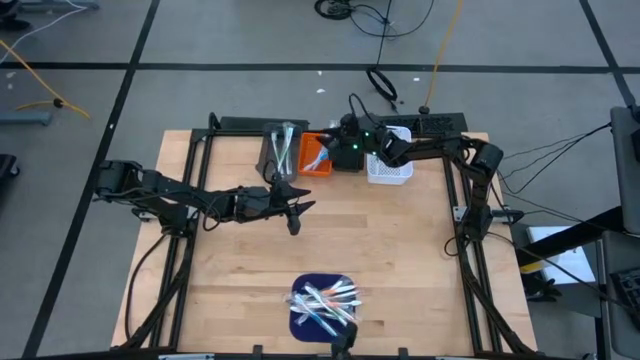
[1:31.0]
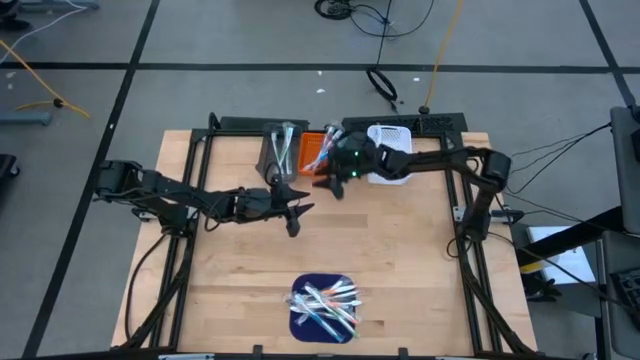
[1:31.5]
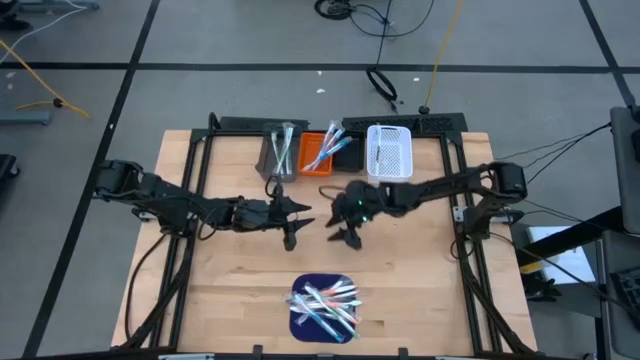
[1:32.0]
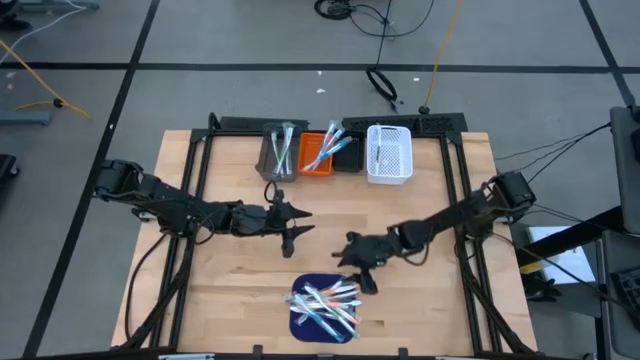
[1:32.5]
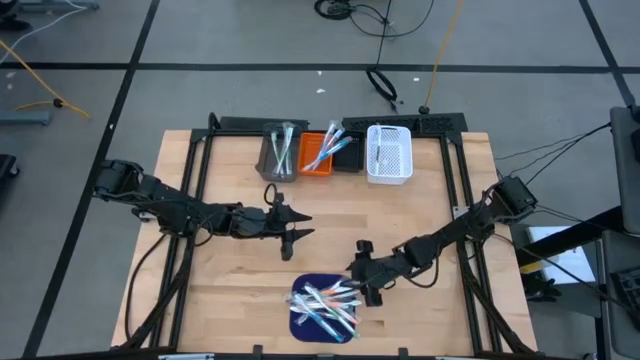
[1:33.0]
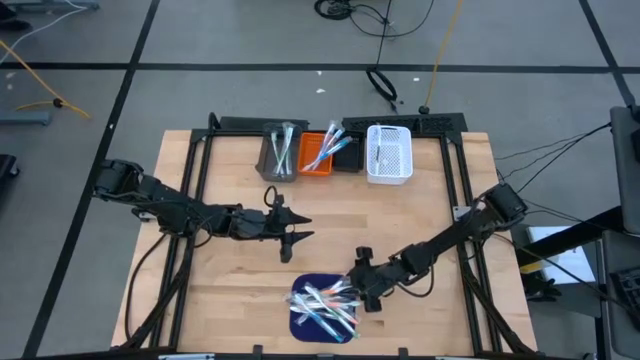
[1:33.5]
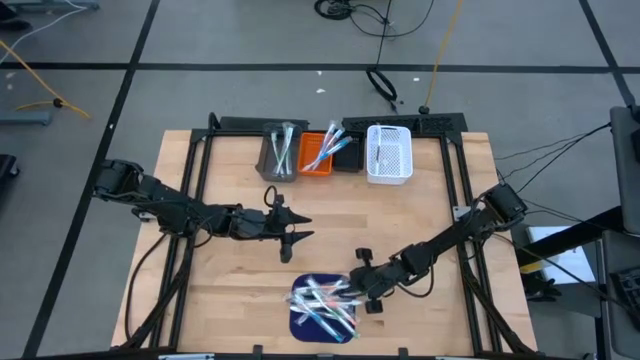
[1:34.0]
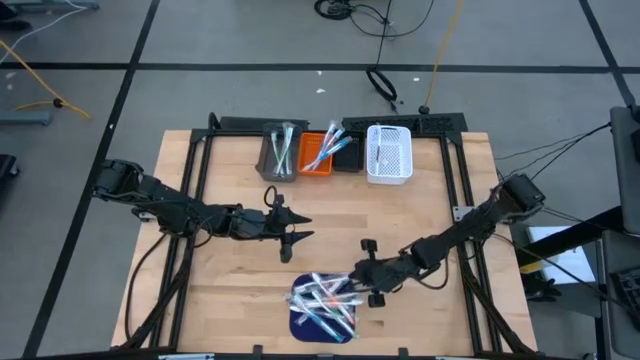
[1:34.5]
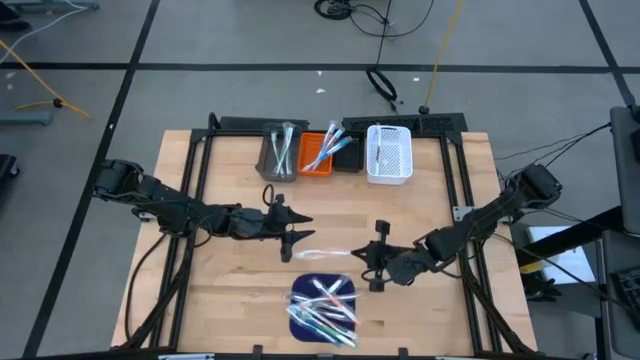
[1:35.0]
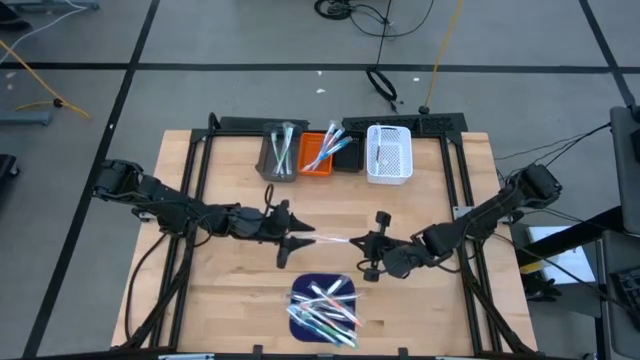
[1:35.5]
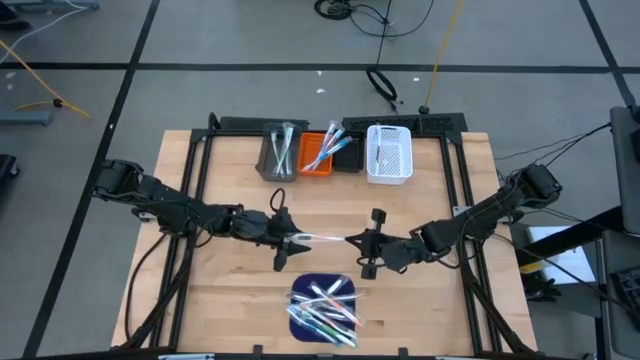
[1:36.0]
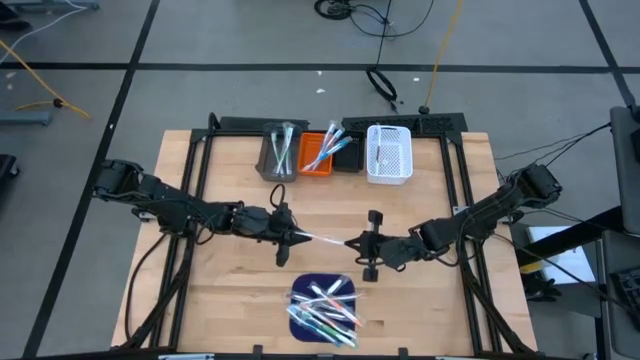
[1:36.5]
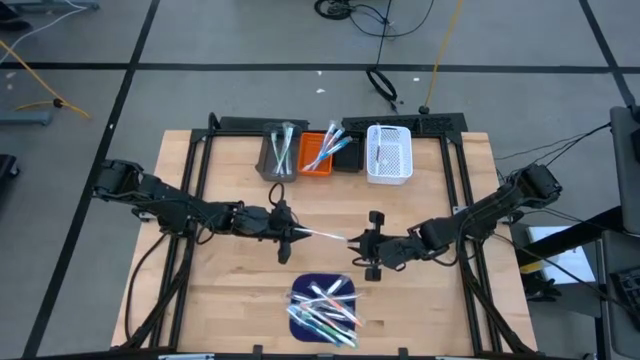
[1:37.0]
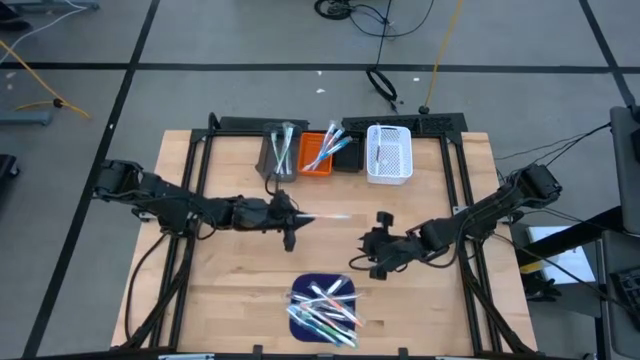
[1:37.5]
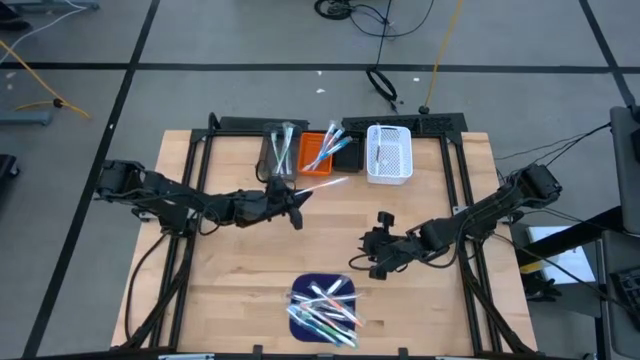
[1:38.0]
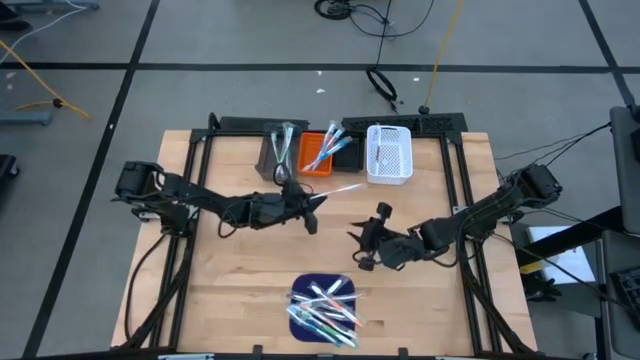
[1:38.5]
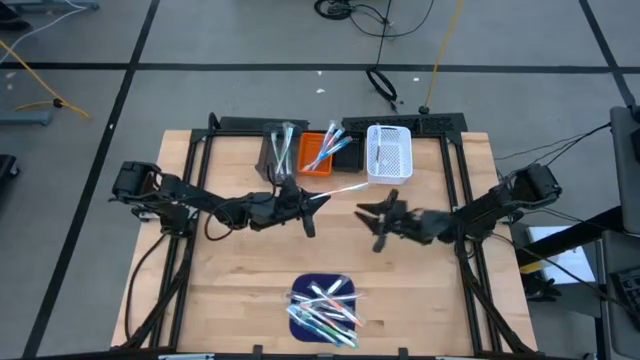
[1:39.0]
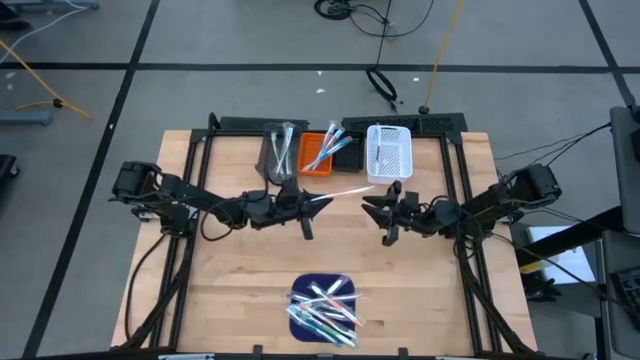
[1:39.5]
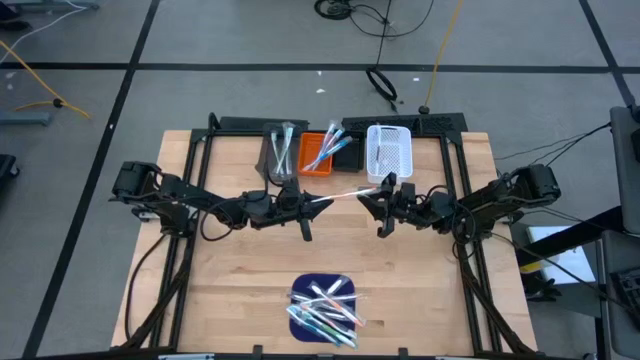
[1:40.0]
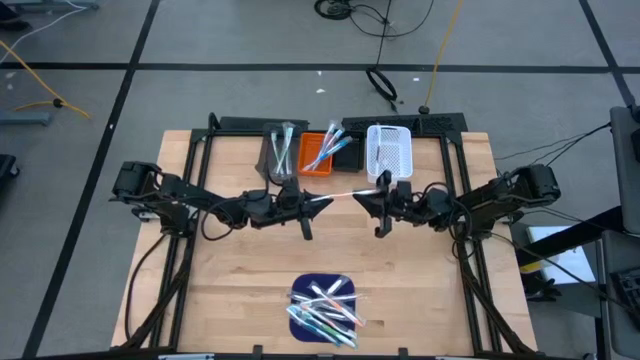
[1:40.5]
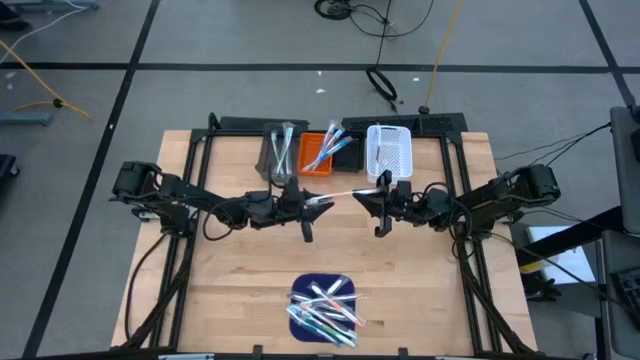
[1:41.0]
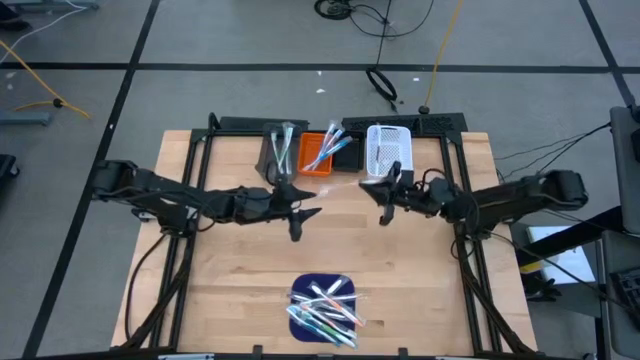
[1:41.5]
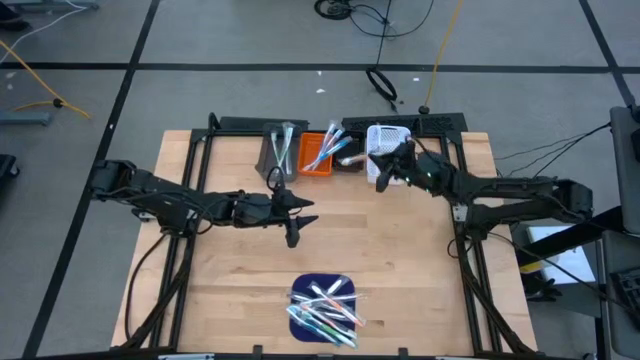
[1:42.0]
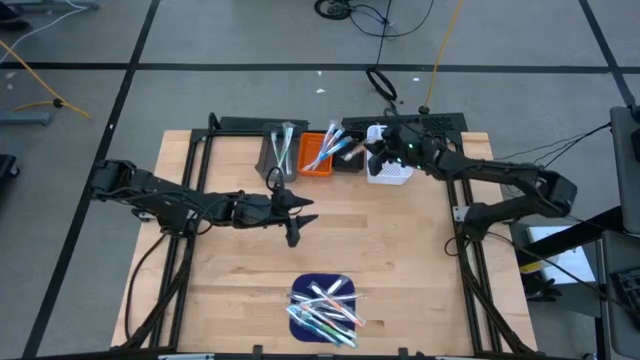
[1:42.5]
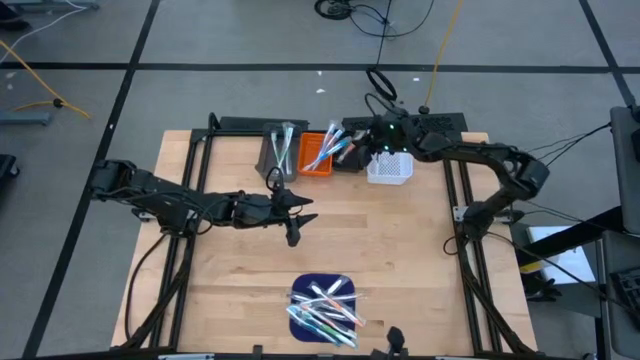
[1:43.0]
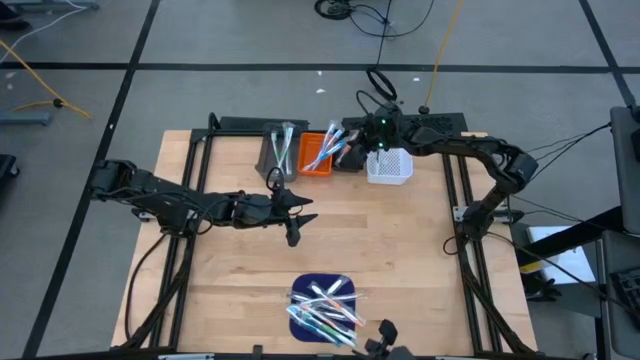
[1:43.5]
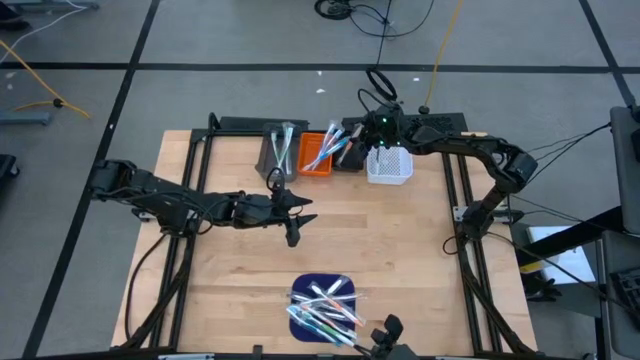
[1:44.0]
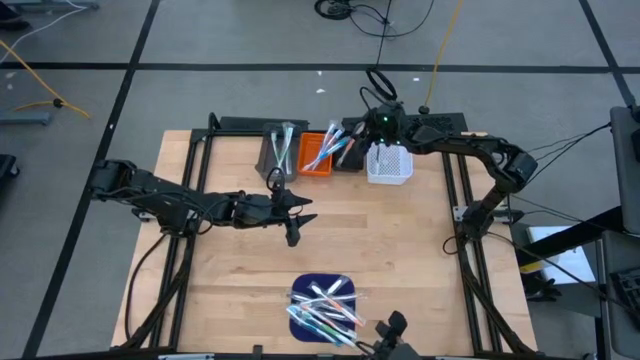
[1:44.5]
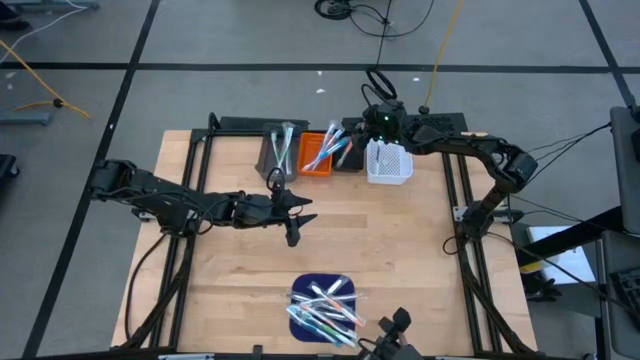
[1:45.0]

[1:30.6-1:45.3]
Task: Pick & Place Toothbrushes
Put the orange toothbrush into the black bin

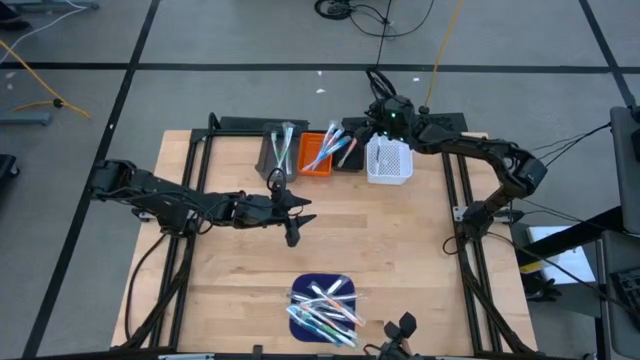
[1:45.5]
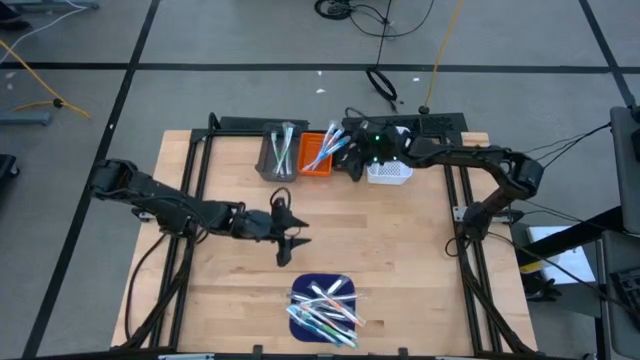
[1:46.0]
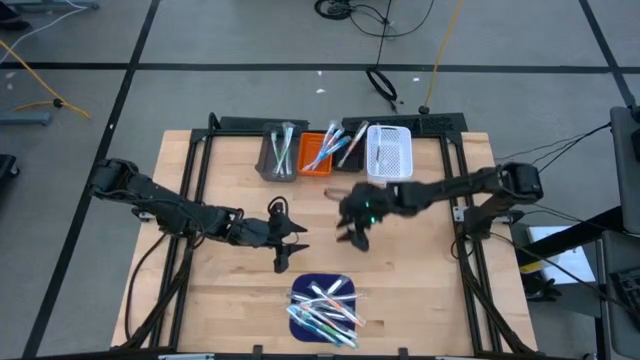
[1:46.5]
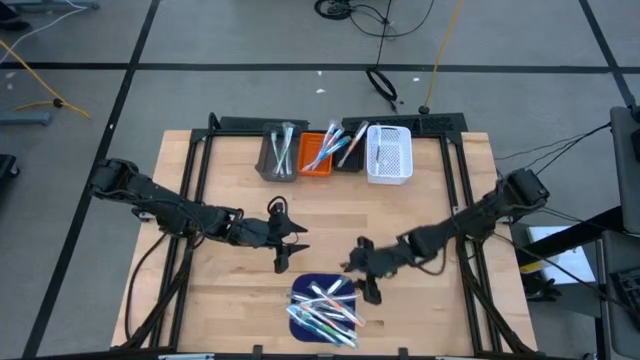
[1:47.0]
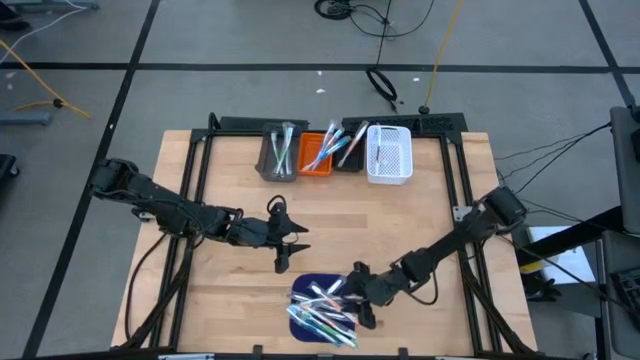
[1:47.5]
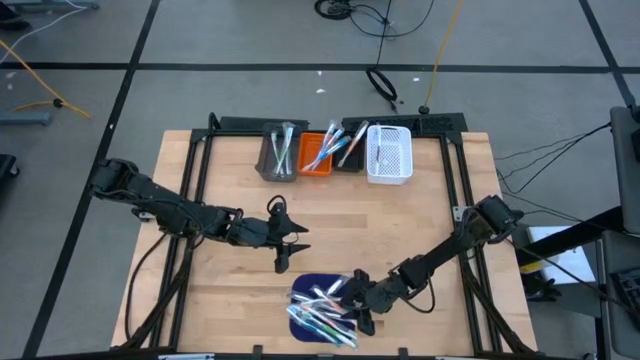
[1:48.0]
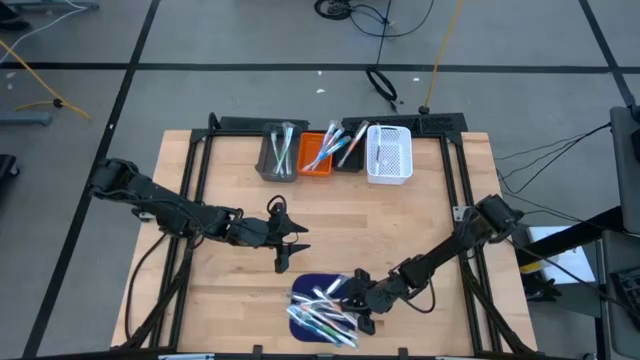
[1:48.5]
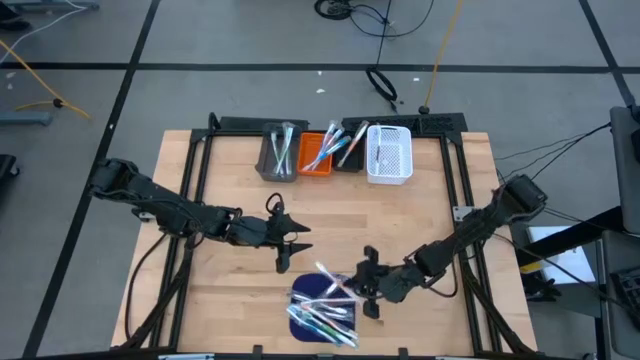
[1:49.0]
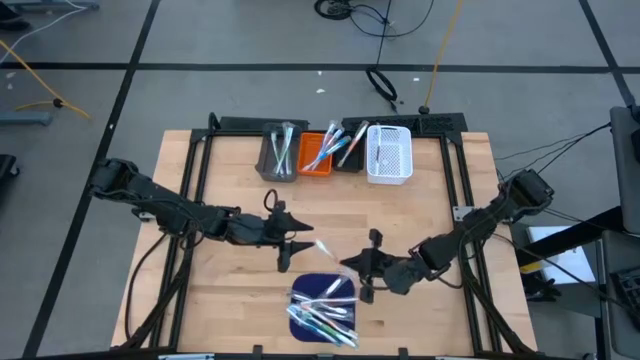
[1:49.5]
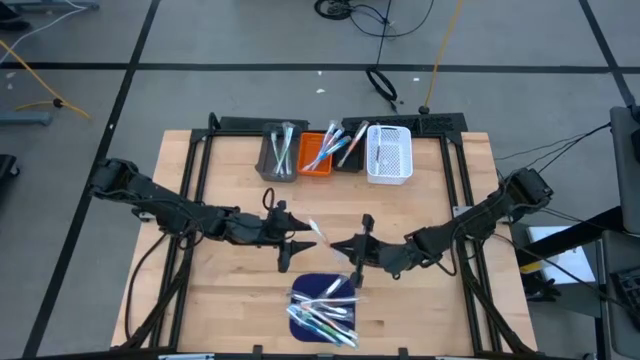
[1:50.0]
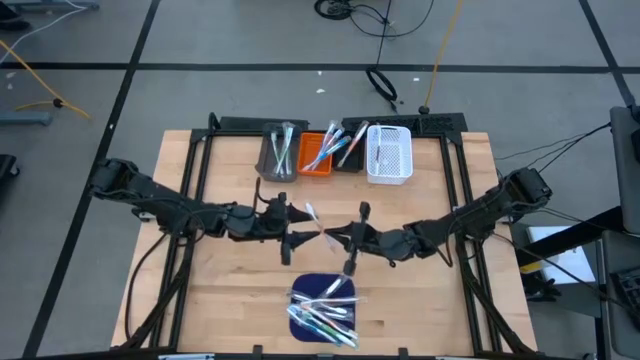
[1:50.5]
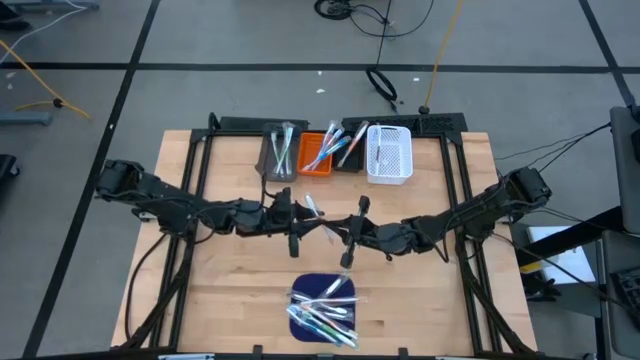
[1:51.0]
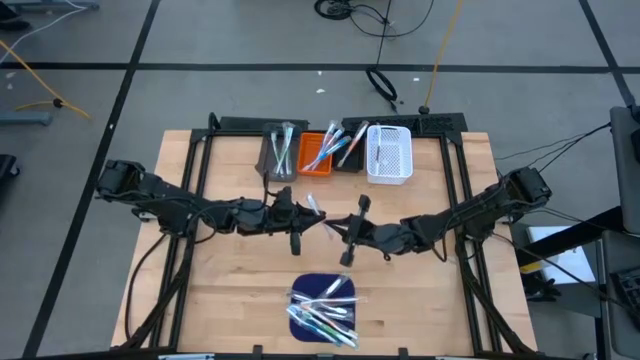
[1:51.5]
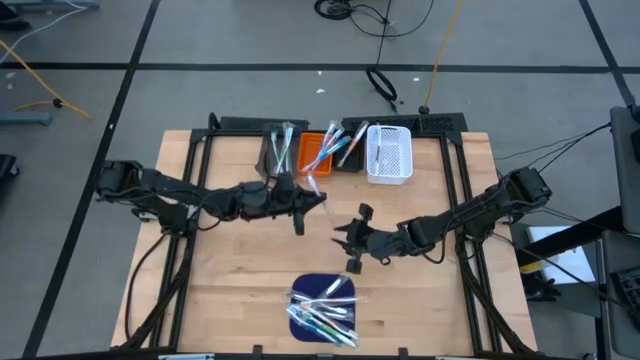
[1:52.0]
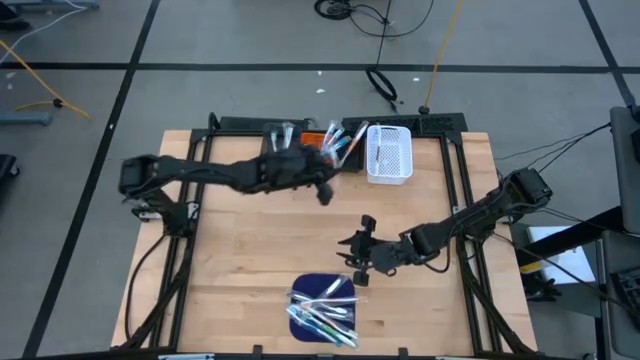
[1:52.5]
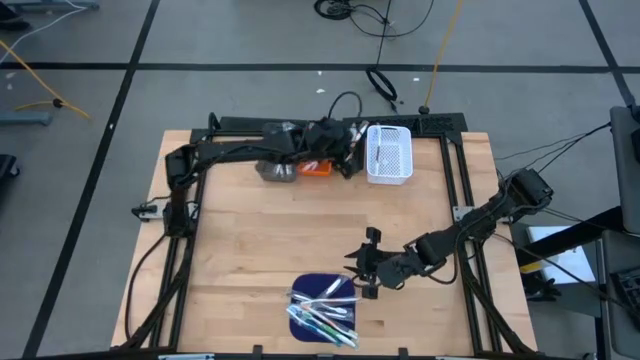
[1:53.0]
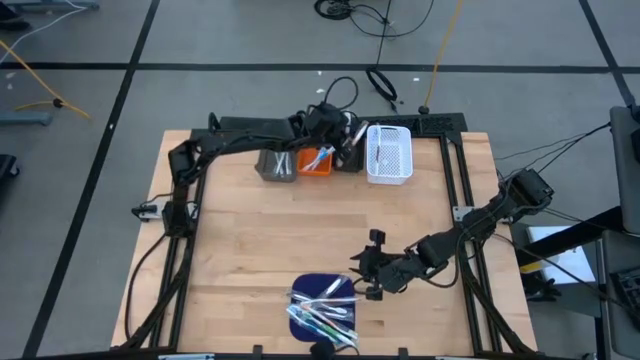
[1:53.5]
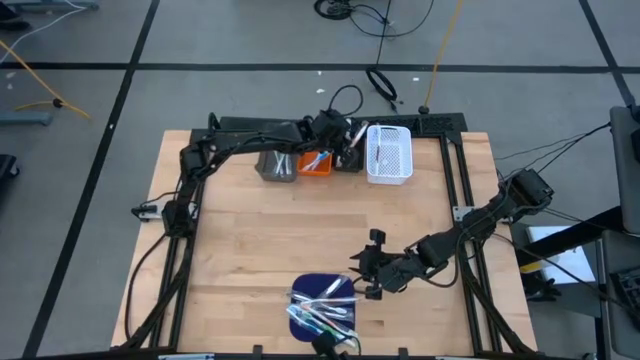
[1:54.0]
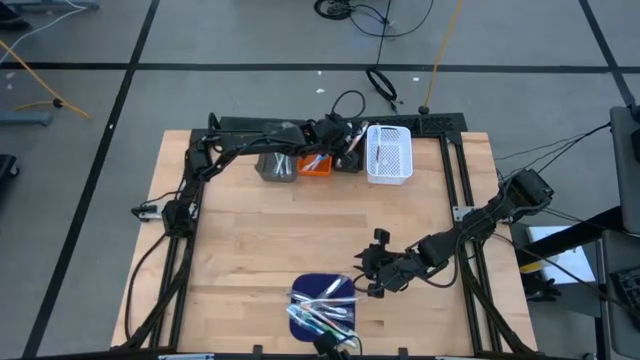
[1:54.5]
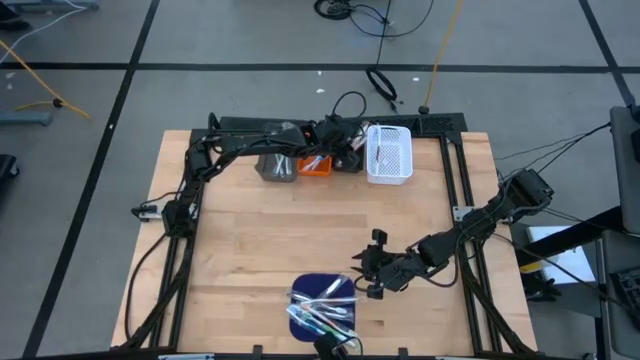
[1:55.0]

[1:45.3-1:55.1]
Put the orange toothbrush into the black bin
